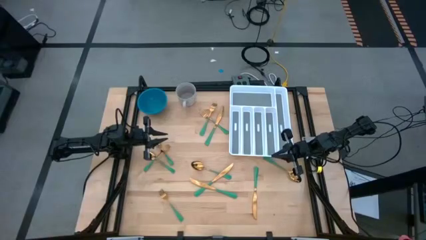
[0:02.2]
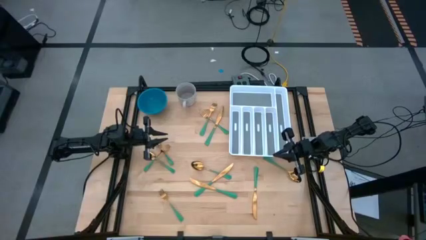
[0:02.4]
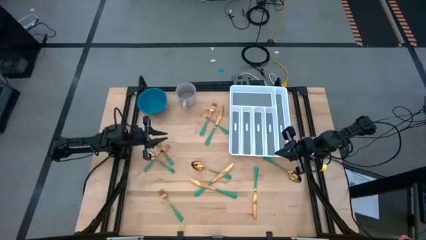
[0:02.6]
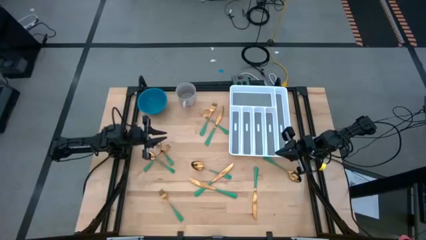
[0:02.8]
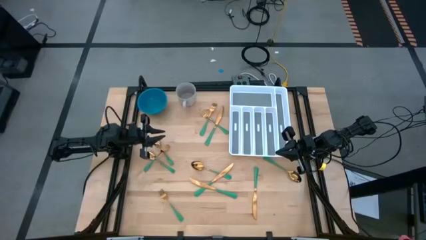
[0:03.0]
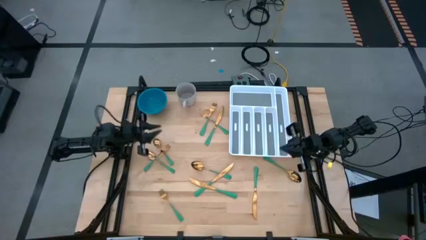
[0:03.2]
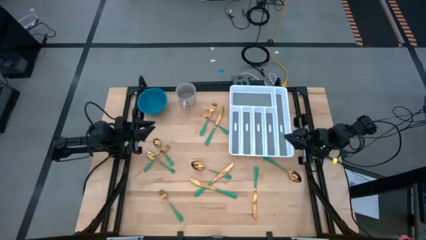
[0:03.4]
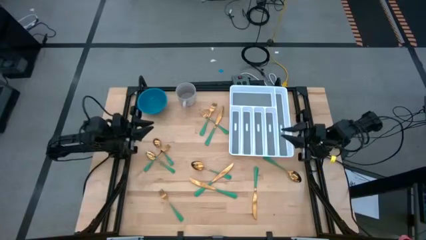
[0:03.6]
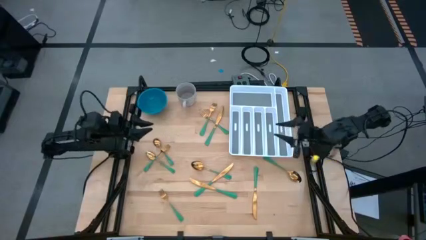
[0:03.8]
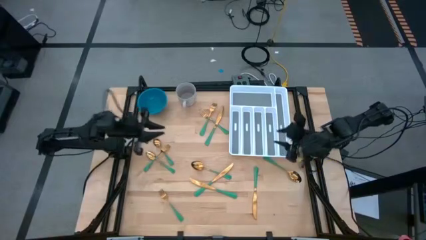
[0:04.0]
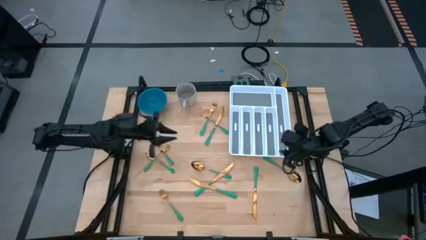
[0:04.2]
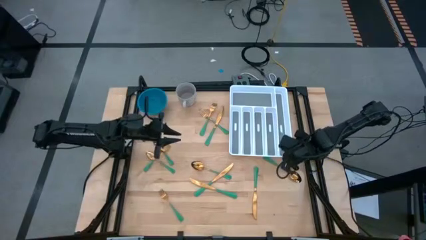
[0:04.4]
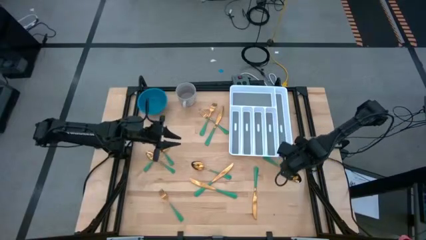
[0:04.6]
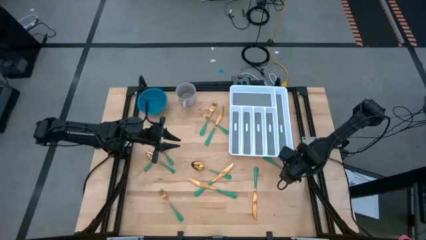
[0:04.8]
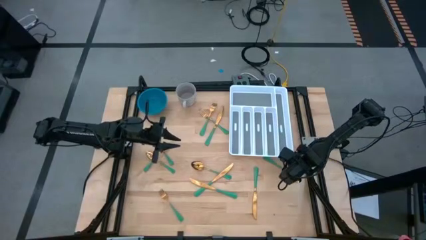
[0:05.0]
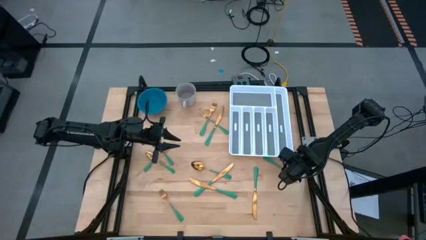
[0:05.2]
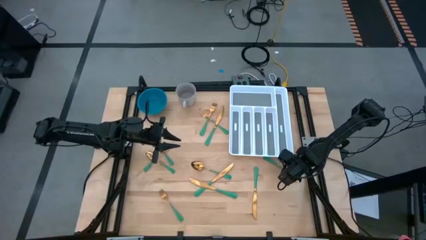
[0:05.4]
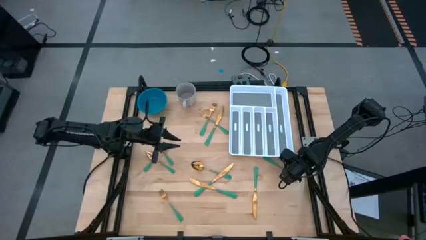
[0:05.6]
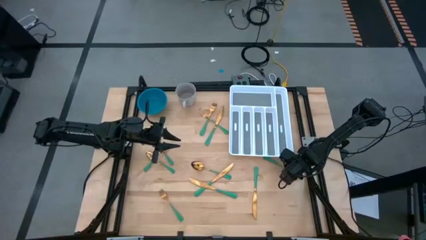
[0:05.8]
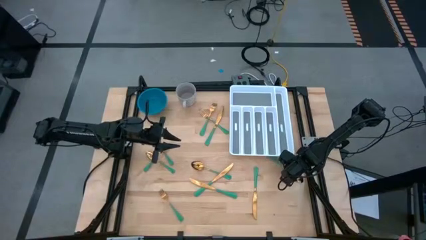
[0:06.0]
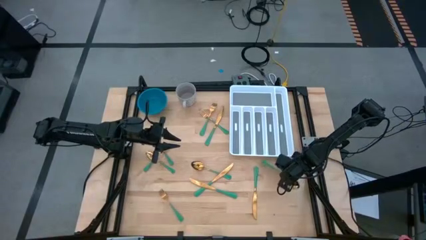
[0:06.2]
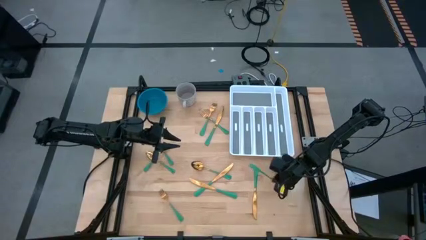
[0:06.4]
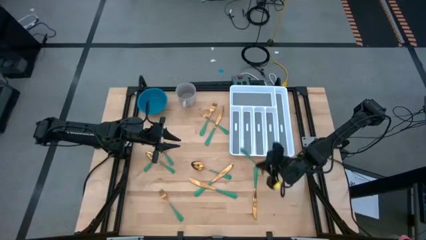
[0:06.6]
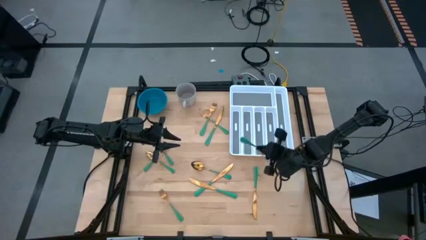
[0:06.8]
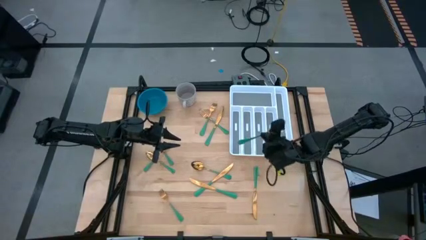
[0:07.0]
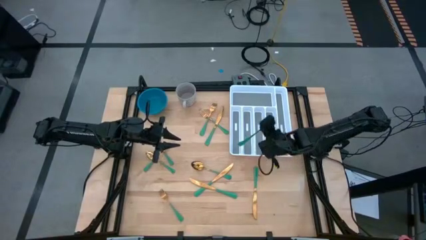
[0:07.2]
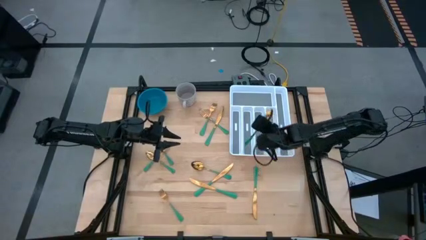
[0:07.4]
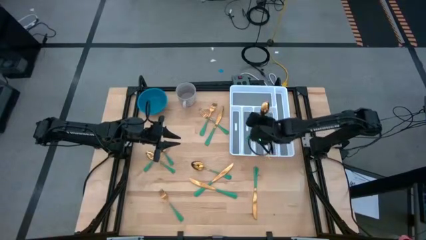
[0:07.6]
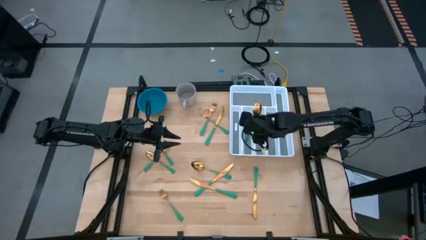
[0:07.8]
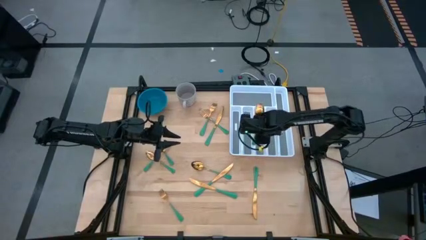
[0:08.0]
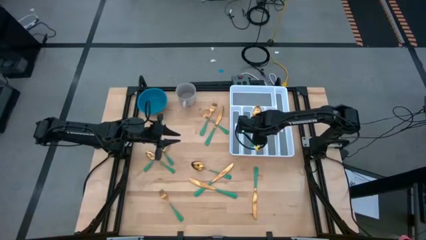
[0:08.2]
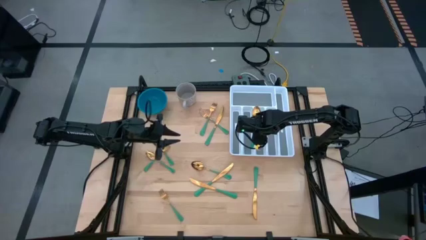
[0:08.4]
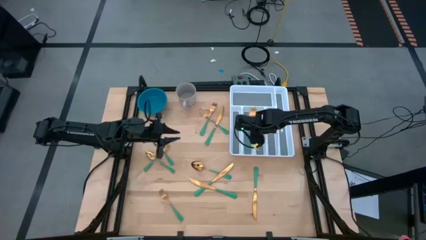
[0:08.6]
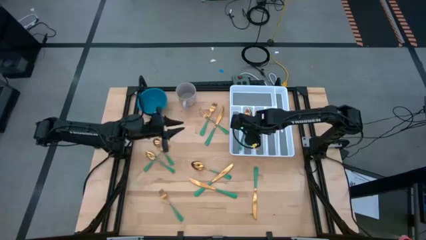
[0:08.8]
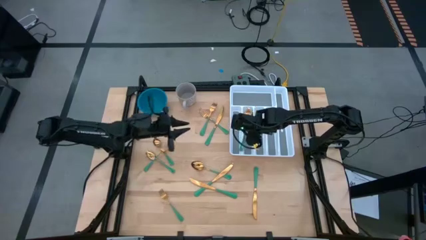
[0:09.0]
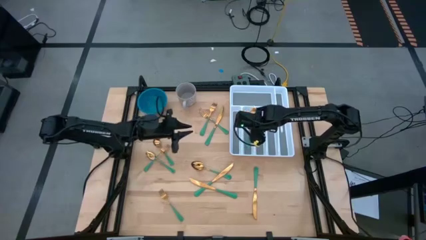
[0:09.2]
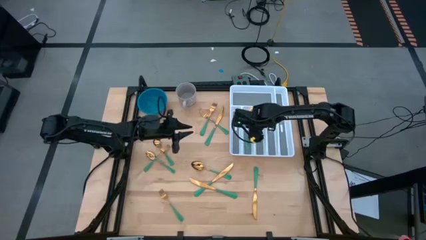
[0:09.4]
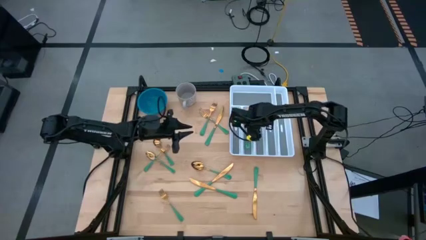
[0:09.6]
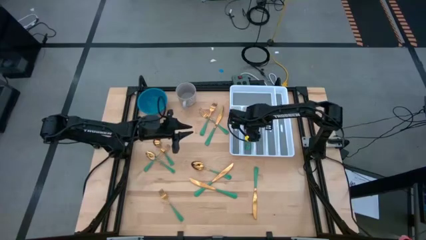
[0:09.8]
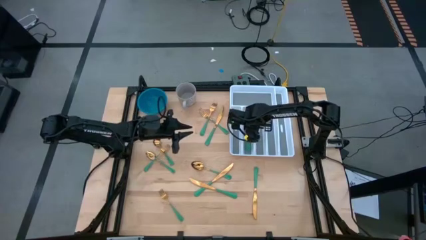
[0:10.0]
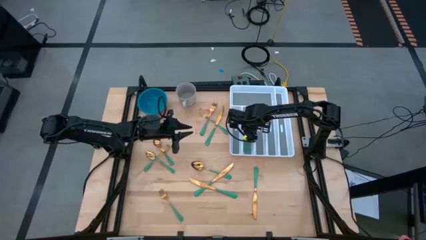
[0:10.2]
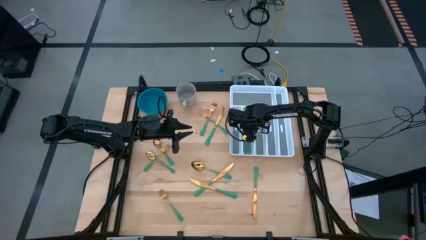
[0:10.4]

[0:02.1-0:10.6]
Task: Sort silverware
Put the green spoon into the white silverware organizer

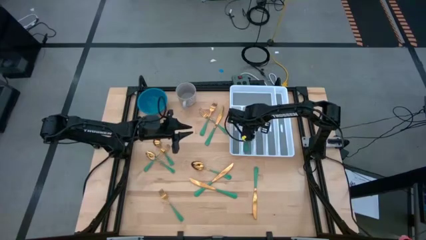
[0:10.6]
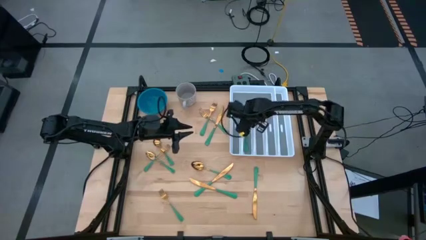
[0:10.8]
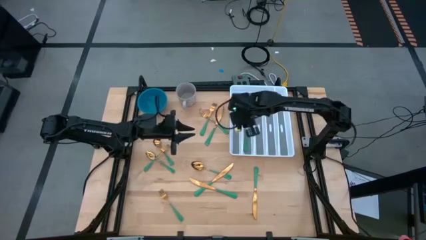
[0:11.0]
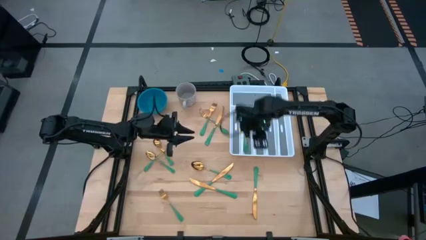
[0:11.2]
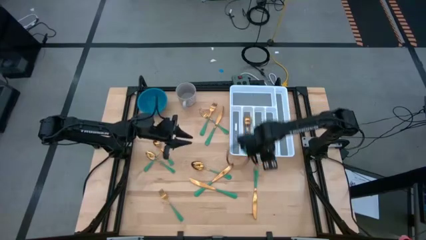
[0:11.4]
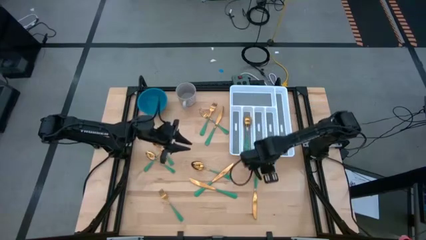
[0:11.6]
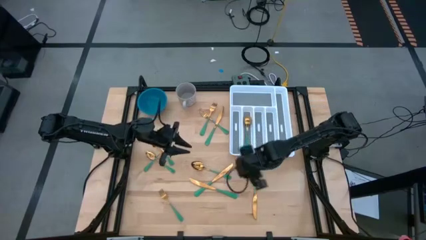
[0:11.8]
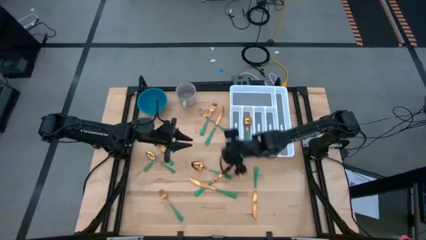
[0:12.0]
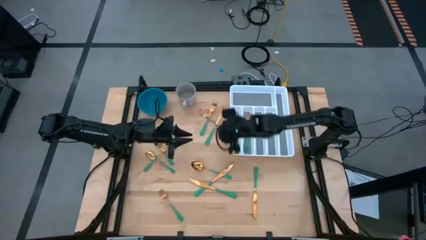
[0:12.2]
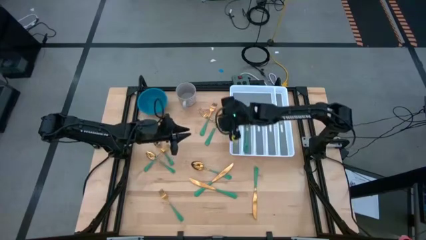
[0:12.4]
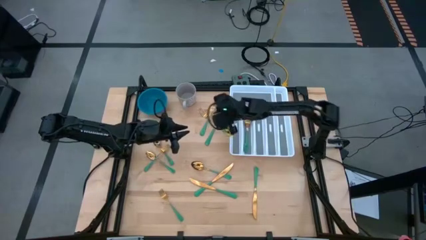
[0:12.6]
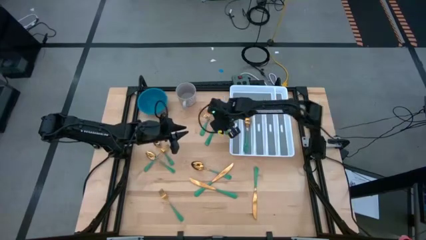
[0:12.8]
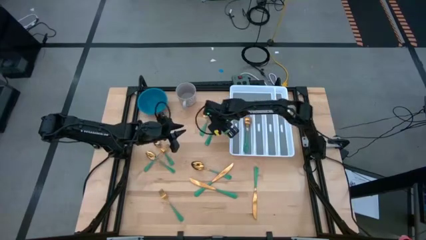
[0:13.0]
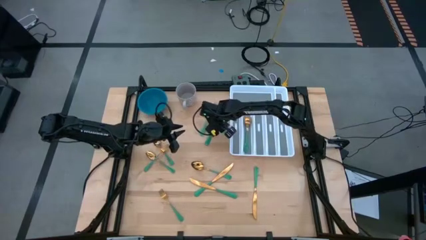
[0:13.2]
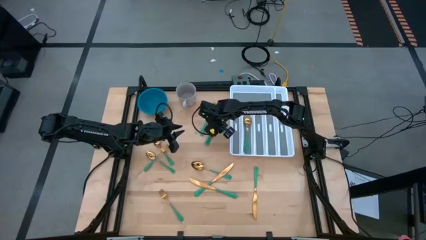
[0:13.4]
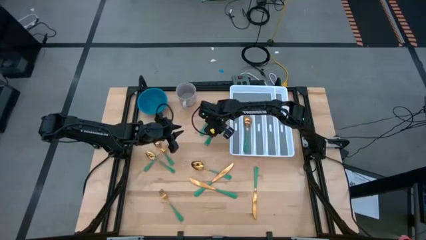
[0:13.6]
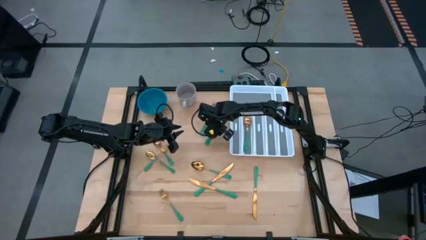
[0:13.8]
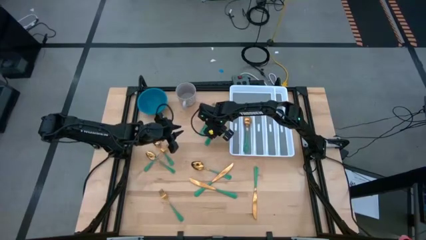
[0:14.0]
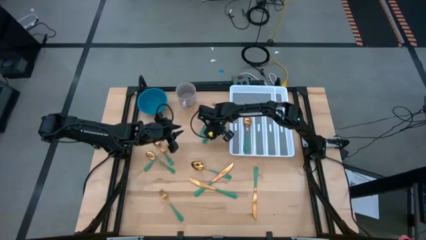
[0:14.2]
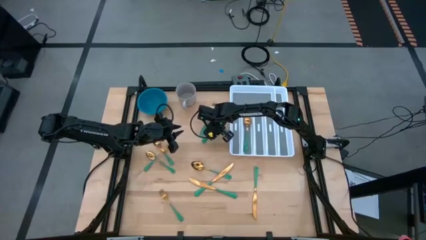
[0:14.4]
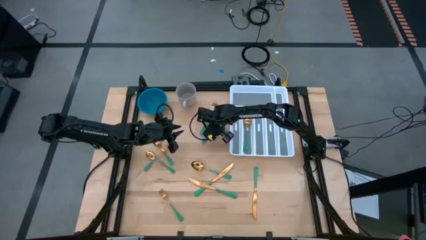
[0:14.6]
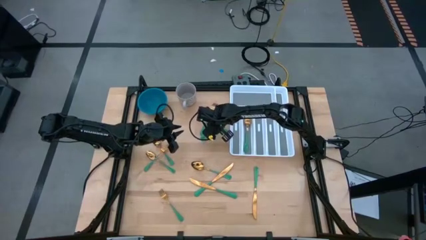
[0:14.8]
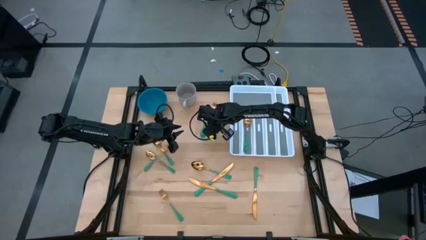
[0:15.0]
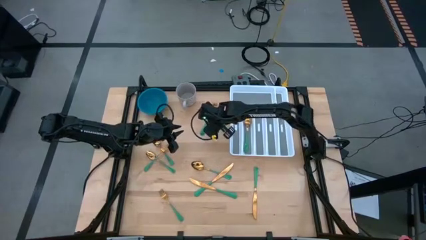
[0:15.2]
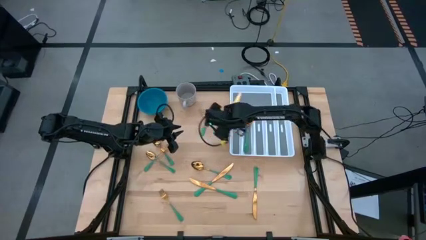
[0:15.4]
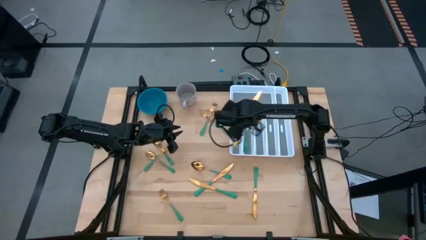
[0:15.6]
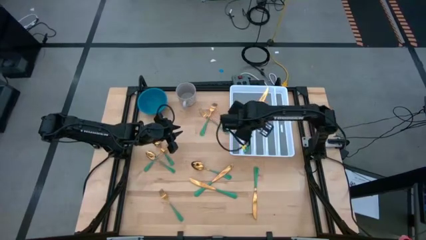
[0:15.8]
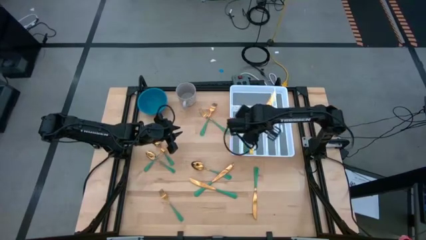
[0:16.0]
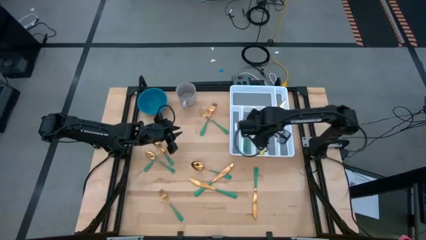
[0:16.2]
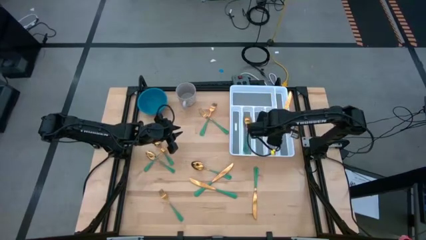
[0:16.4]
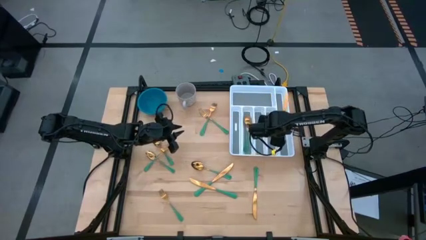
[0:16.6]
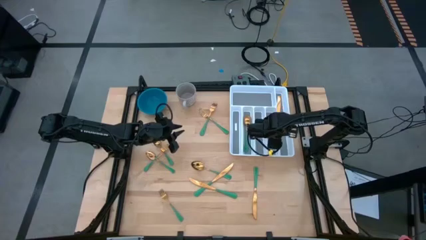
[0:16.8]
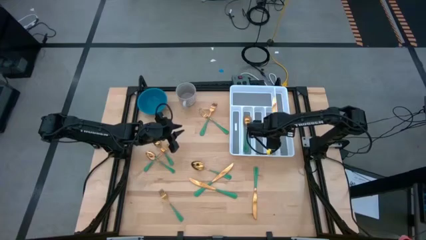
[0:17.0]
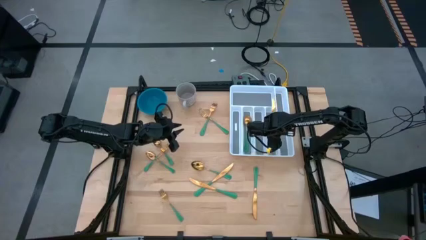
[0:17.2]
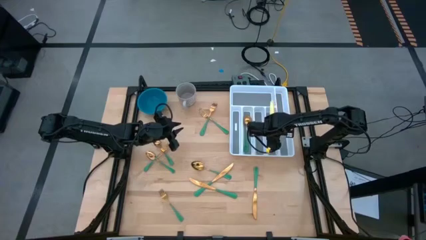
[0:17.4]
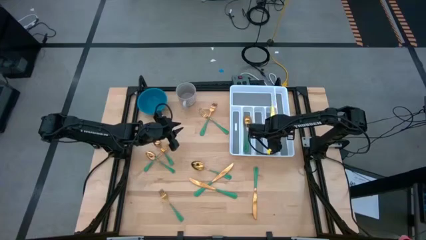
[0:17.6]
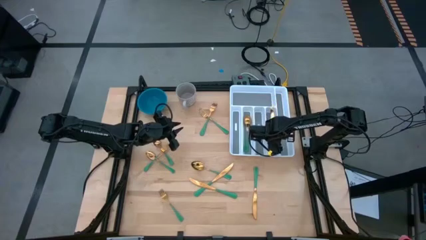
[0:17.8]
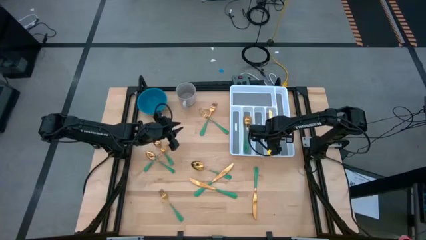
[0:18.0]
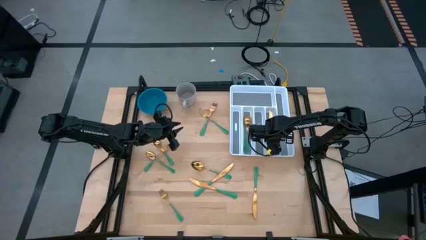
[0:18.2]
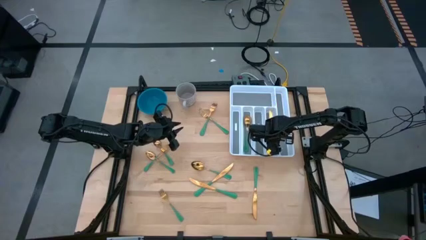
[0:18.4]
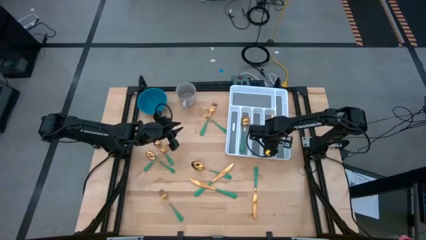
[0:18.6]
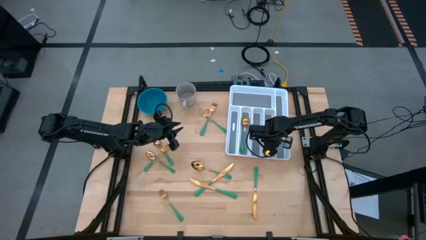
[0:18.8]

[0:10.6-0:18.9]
Put the green knife into the white silverware organizer
